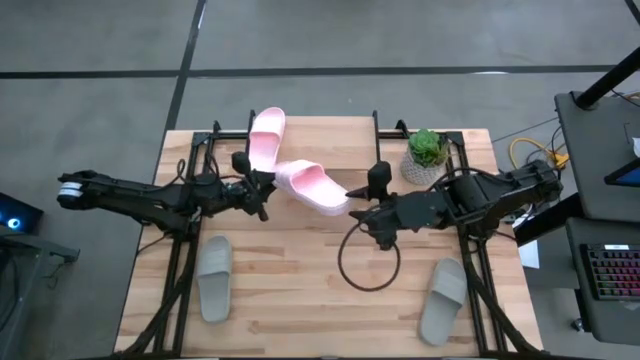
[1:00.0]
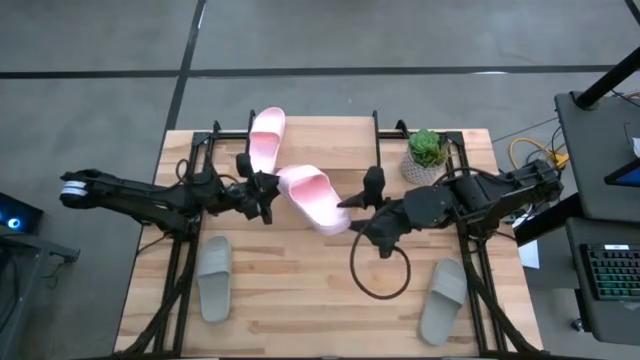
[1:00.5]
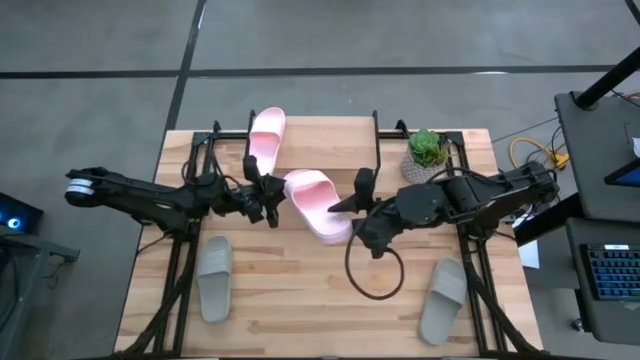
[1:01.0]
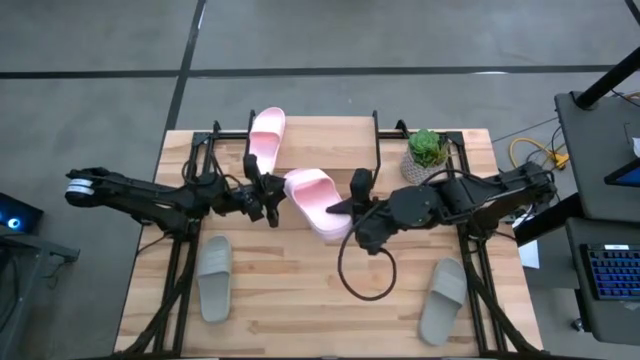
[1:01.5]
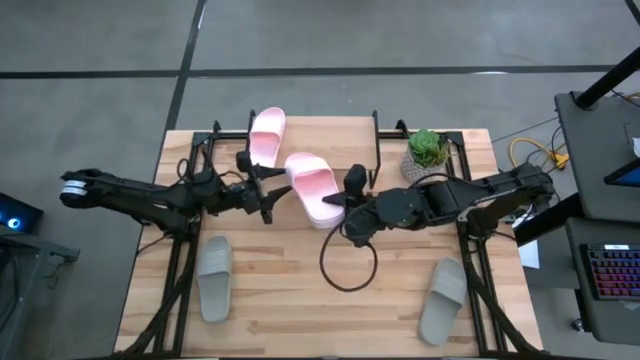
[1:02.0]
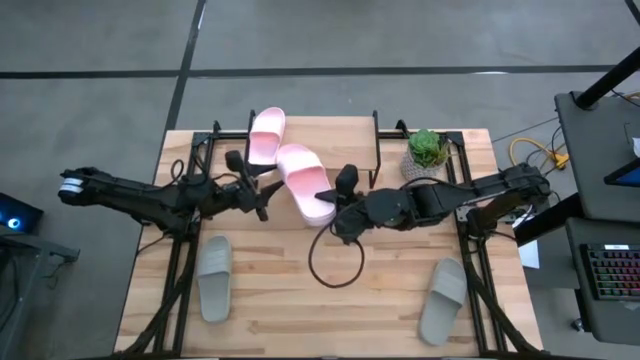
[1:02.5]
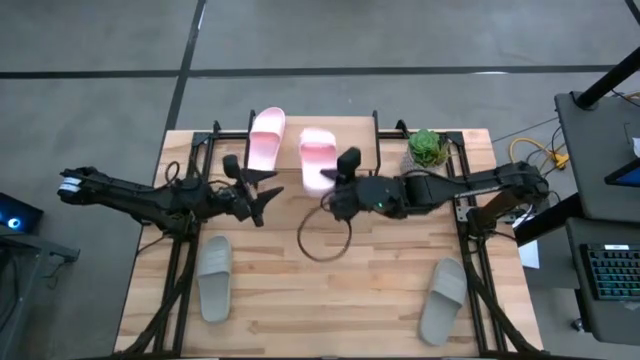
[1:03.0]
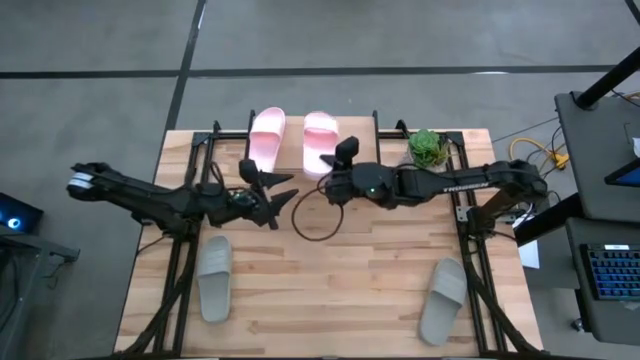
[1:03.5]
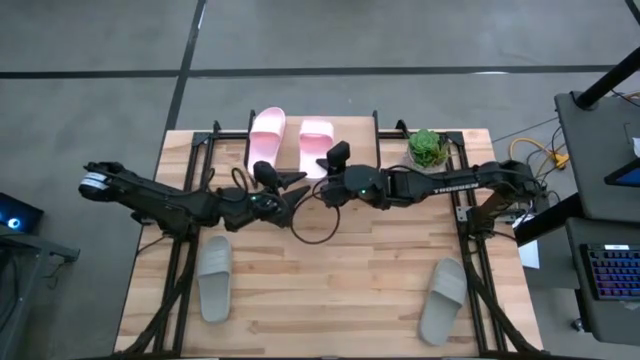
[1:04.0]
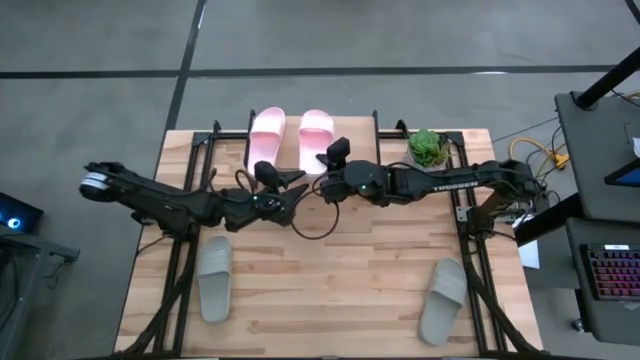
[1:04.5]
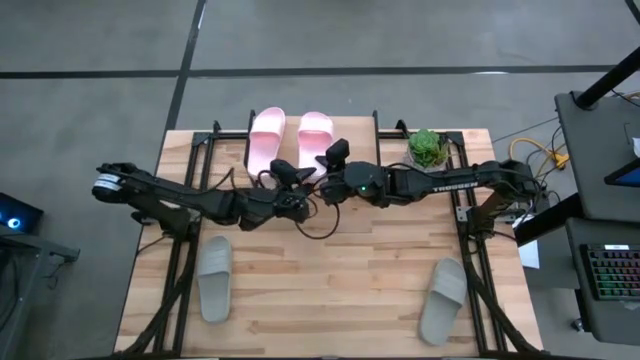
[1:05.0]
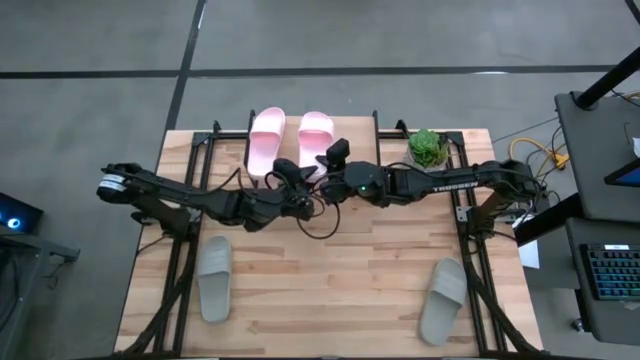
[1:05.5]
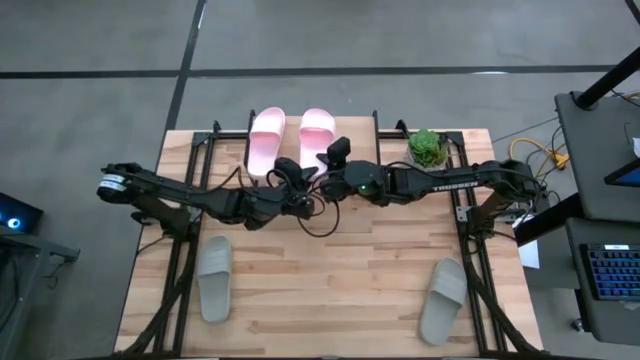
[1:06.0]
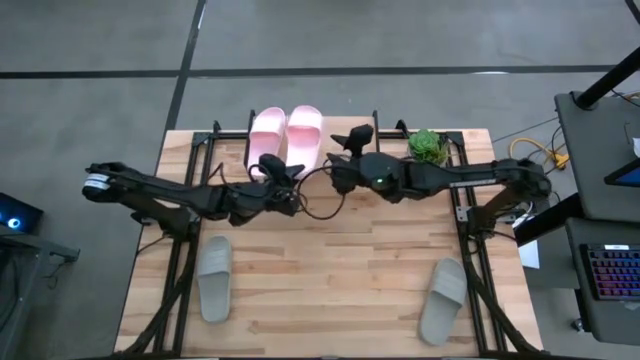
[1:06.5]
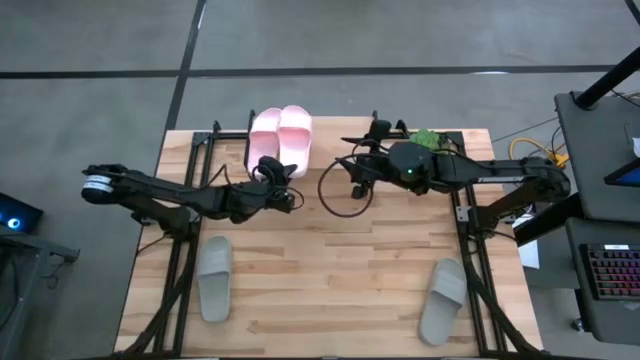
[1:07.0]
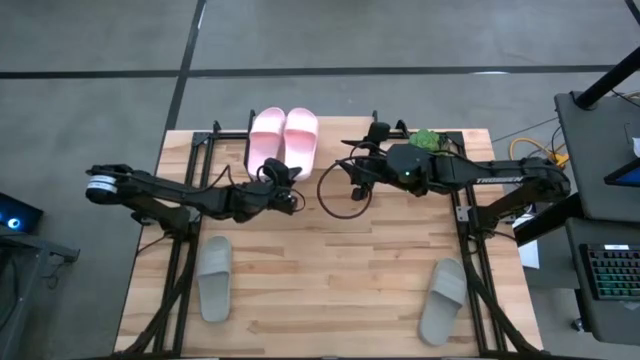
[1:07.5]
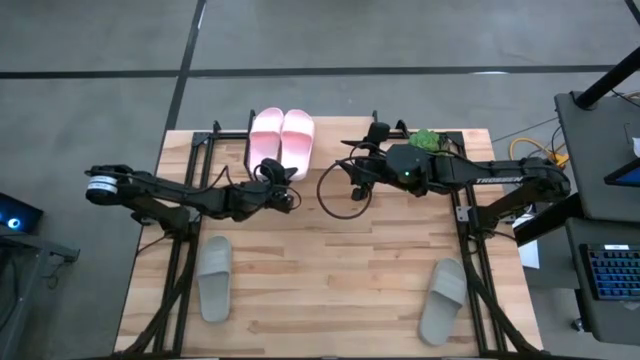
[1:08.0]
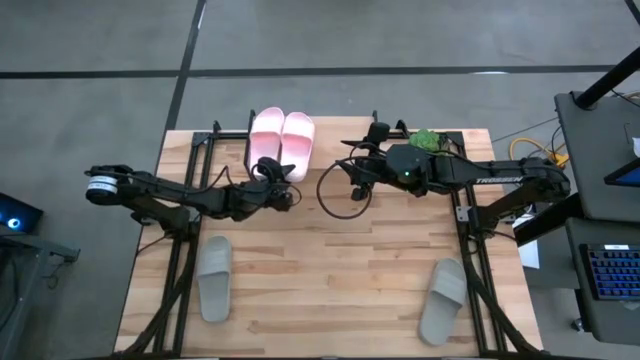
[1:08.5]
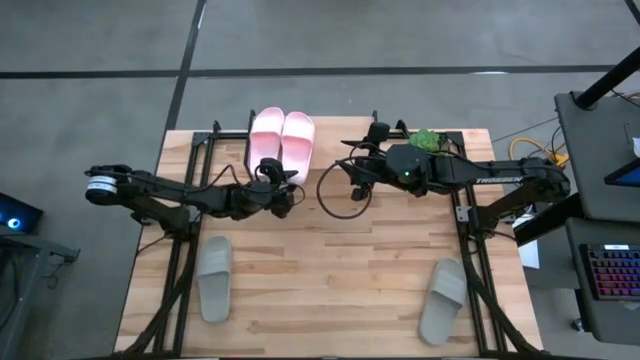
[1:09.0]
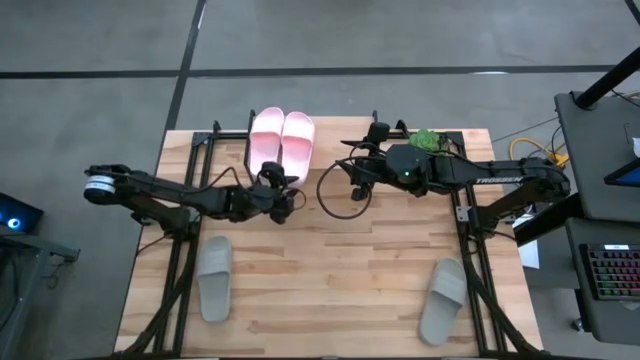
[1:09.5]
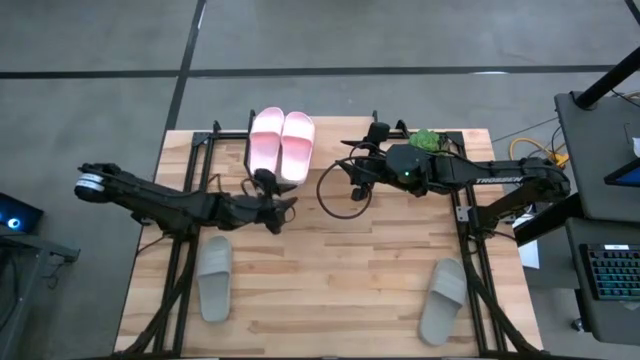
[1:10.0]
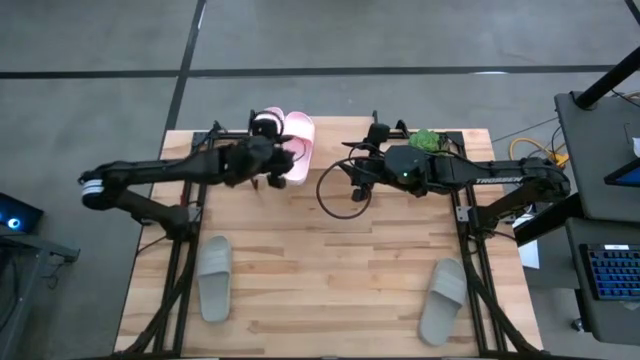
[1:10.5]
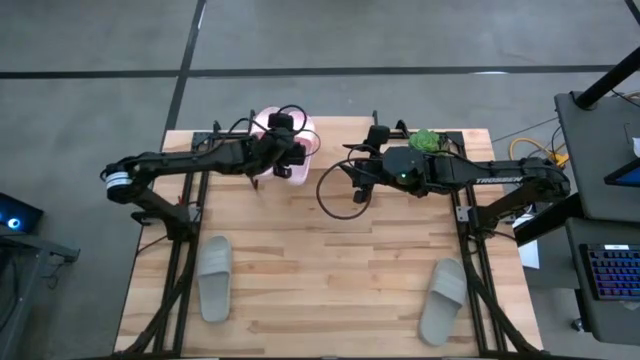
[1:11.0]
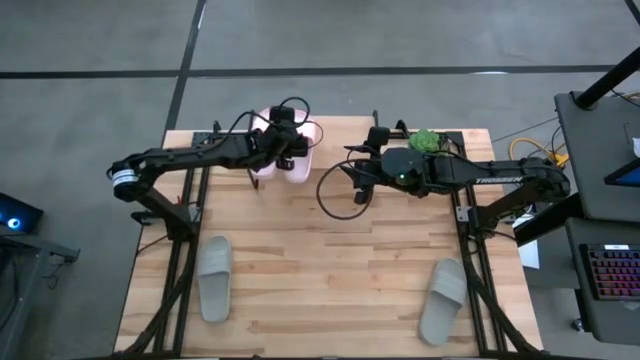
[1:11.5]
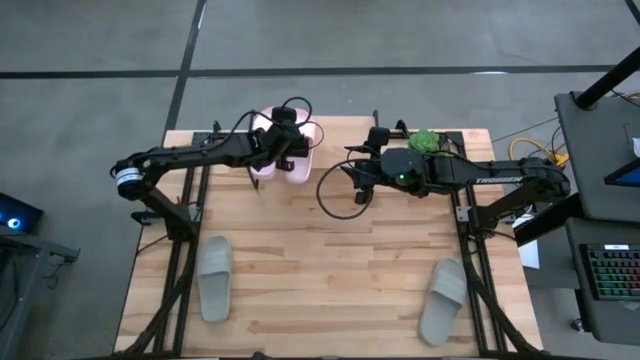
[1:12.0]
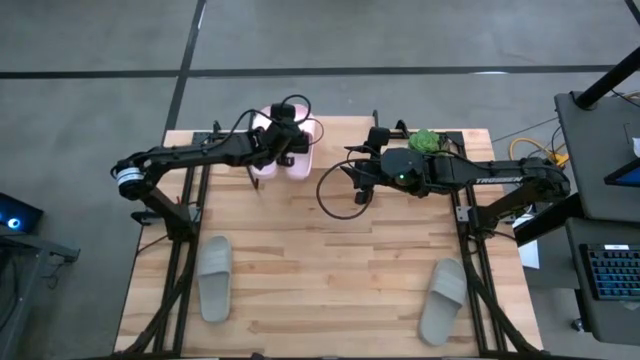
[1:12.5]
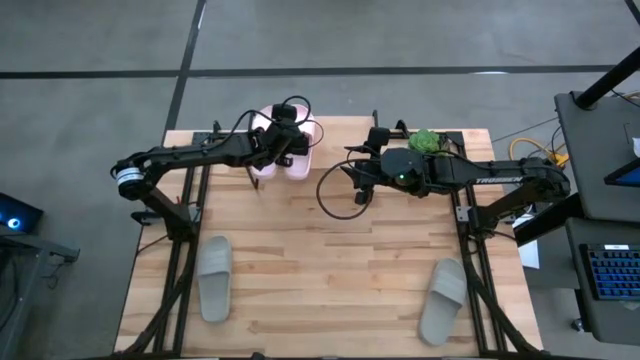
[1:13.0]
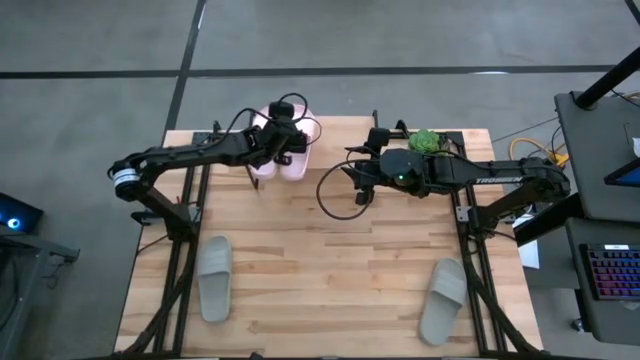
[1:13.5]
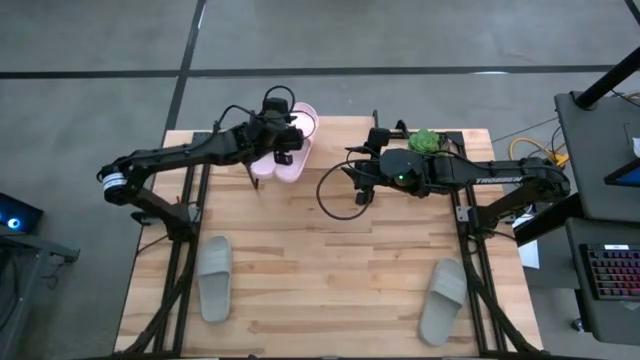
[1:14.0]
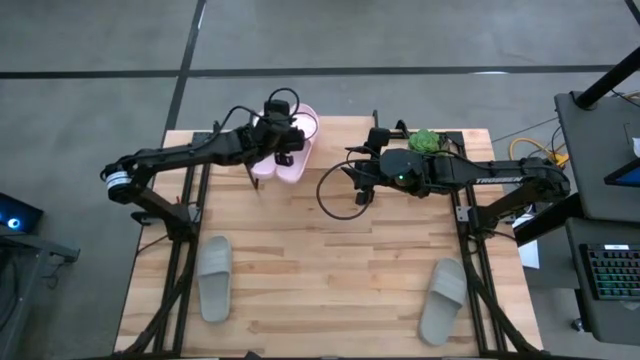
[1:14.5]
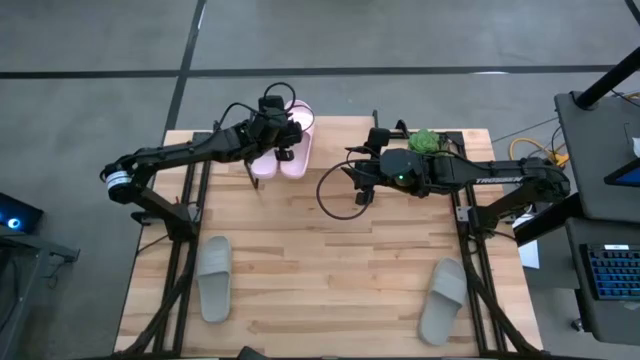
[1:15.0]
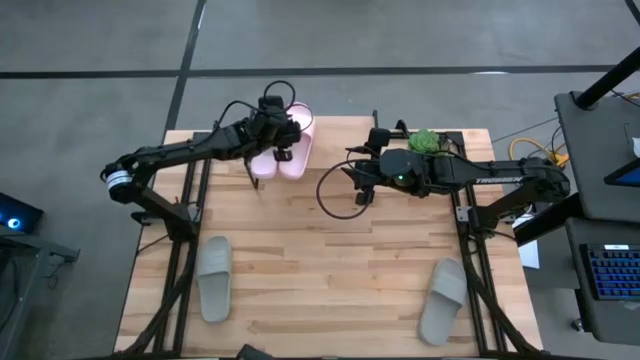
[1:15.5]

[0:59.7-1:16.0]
Task: Pick and place slides into the shelf
Put the pink slipper on the shelf

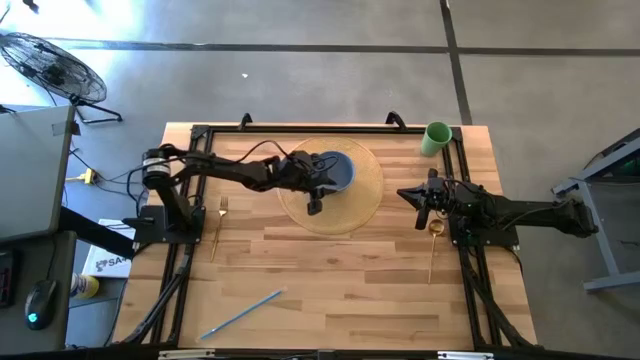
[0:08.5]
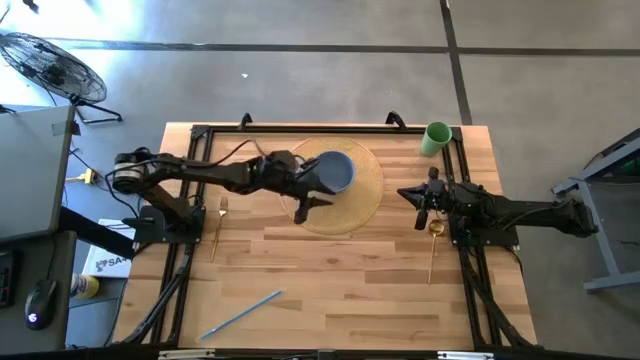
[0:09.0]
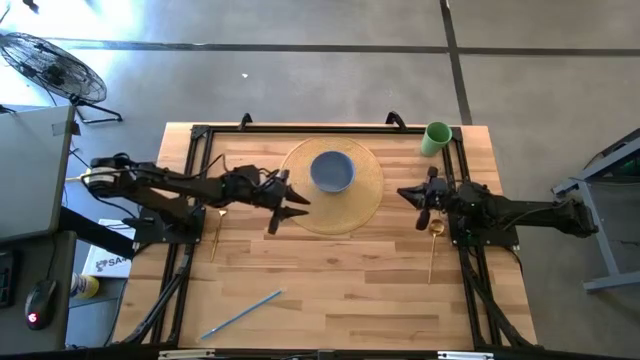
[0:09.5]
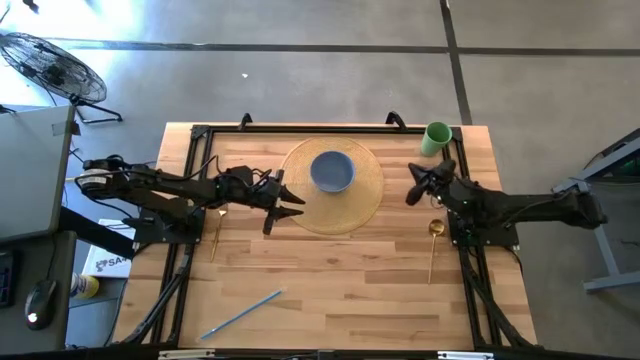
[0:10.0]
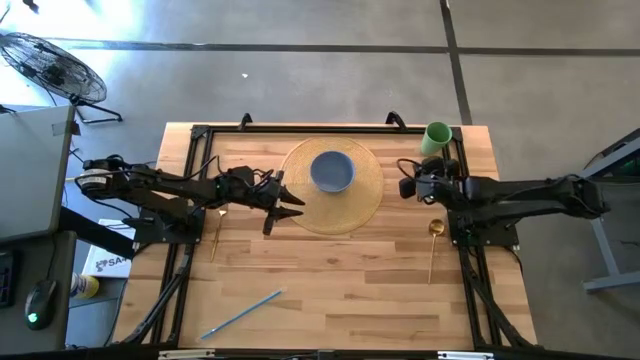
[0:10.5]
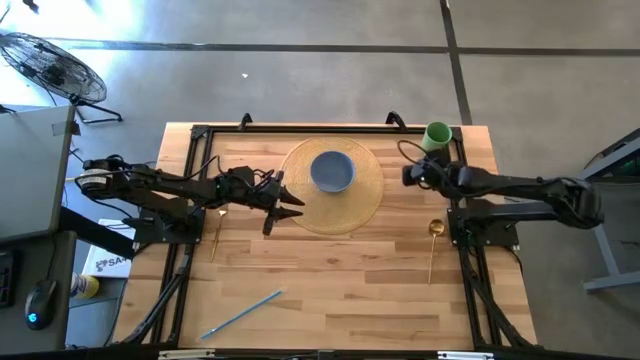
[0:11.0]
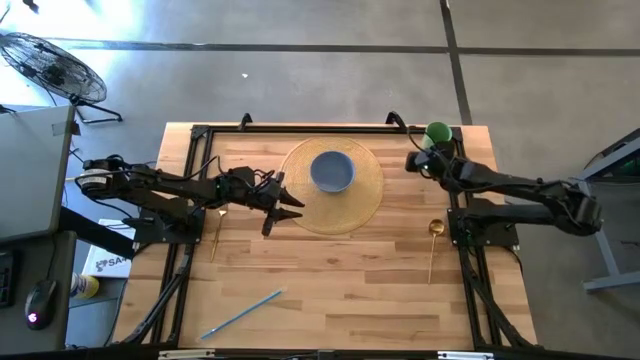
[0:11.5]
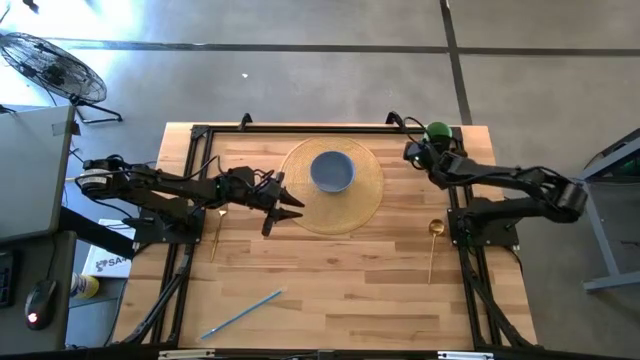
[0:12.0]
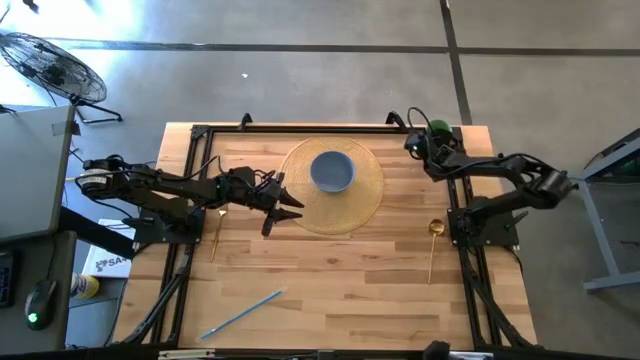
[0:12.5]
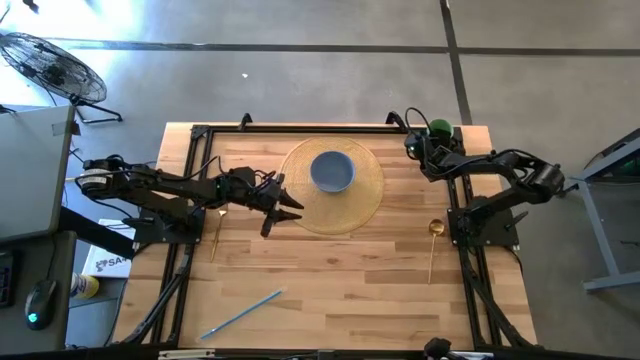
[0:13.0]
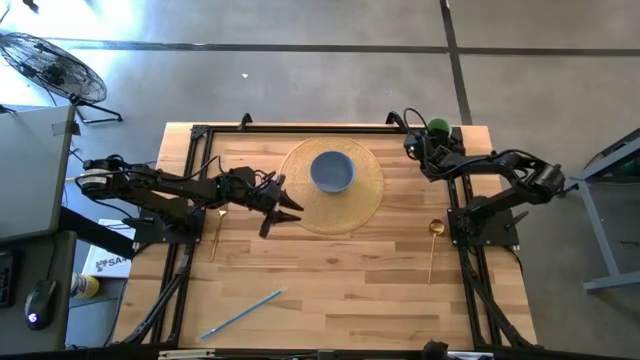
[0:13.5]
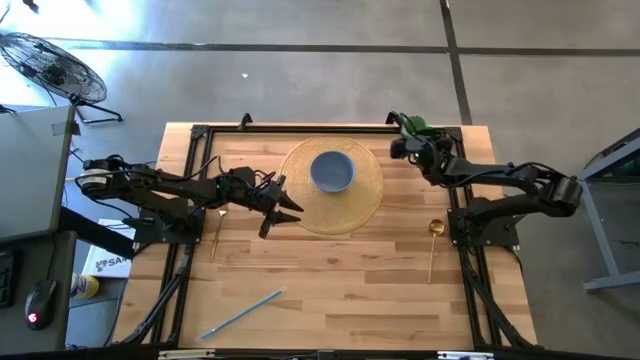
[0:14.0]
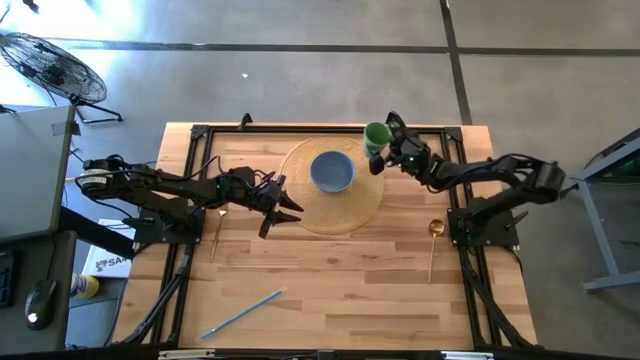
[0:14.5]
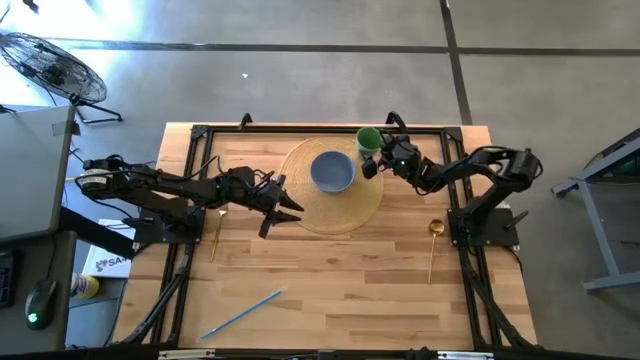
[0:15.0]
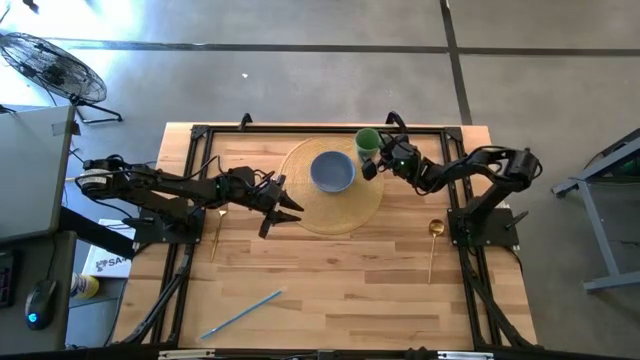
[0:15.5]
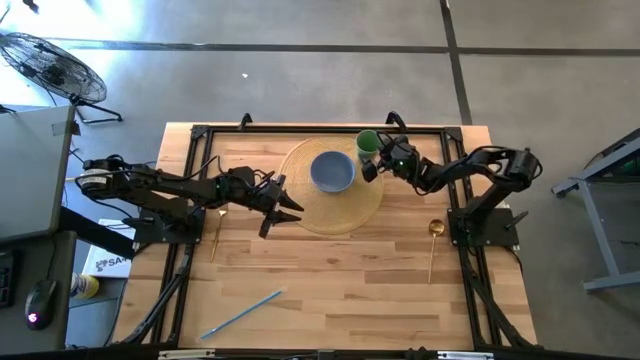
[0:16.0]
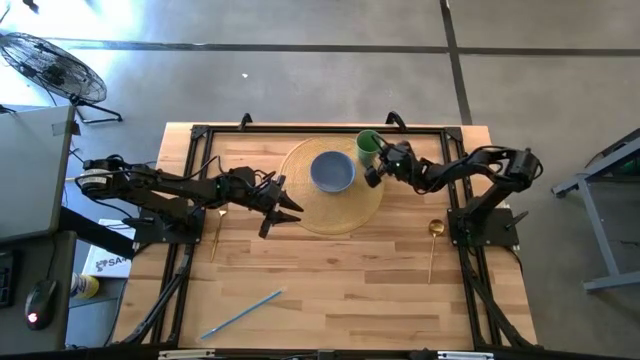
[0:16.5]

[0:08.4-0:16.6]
Task: Pick & Place Utensil
Put the green cup on the brown placemat to the top right of the blue bowl
